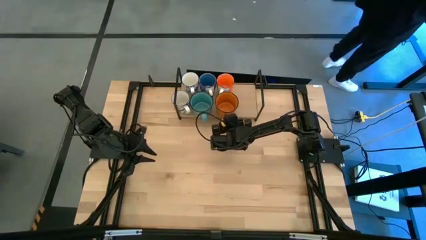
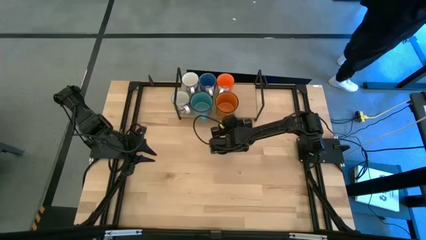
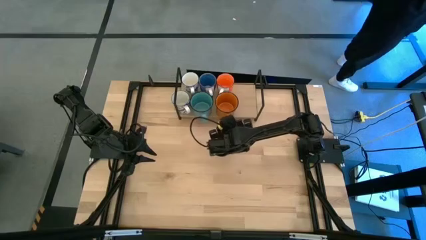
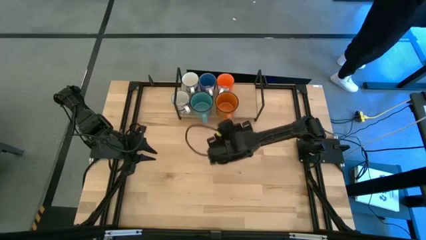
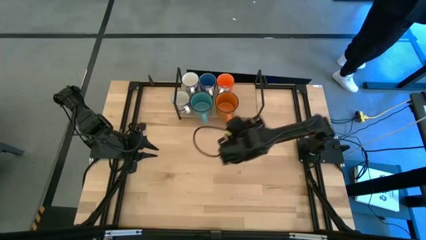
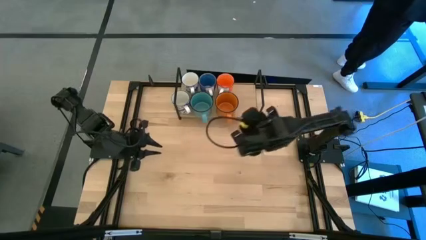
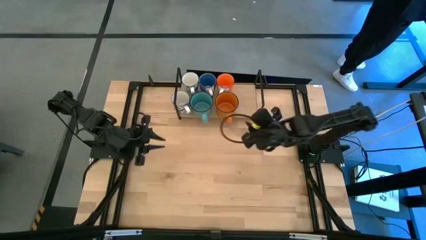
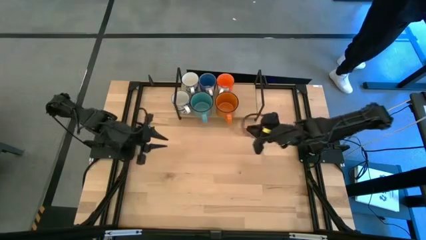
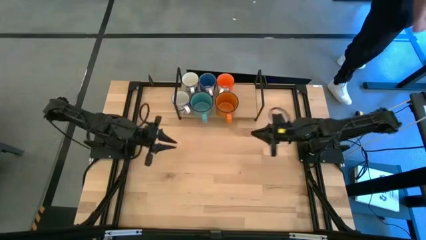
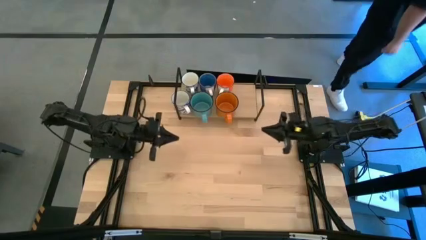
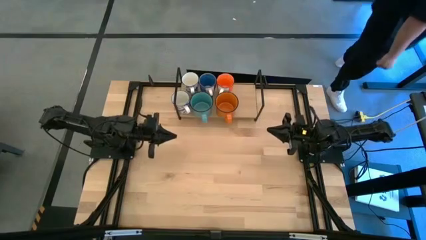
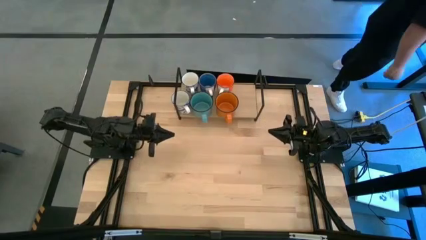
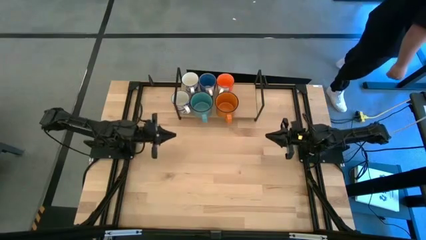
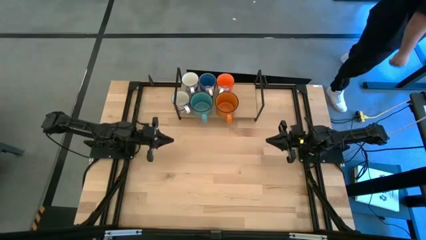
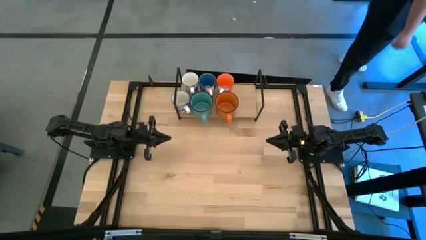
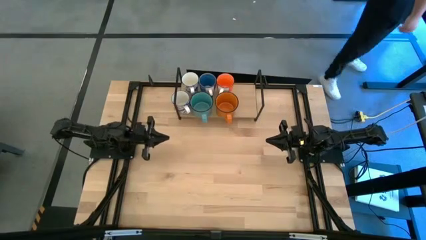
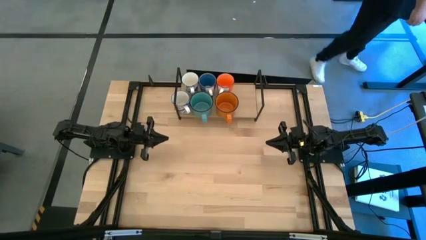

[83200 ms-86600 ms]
Task: Place coffee mugs
Return to Home Position

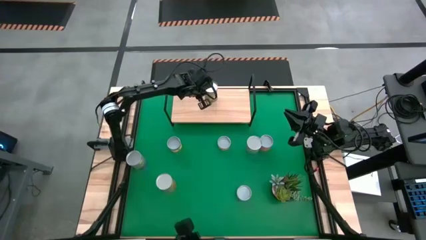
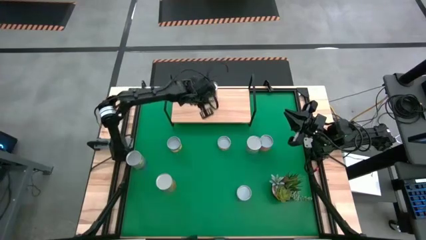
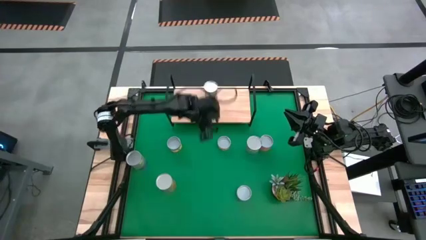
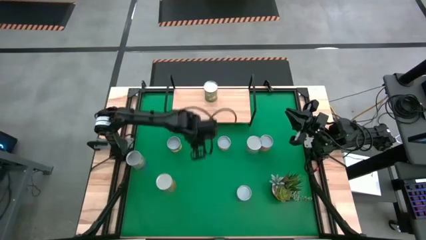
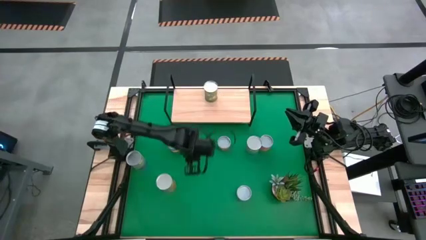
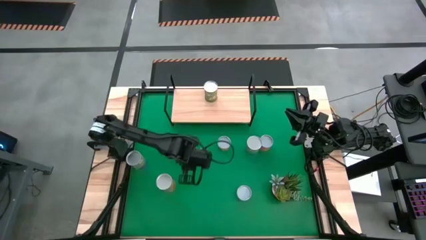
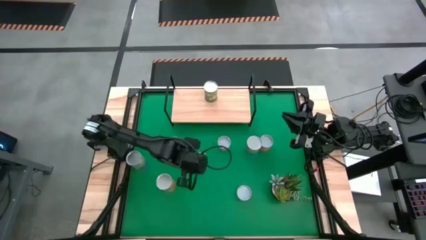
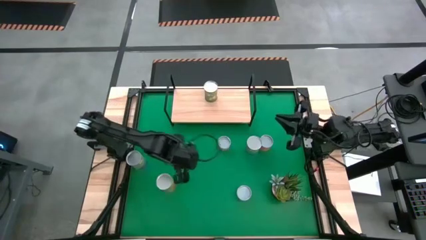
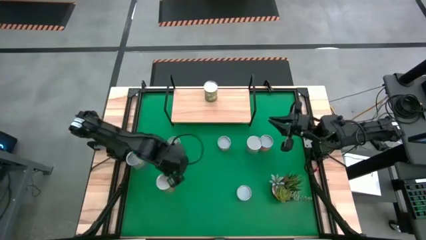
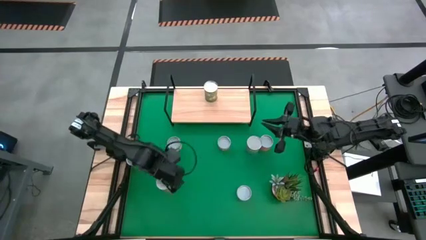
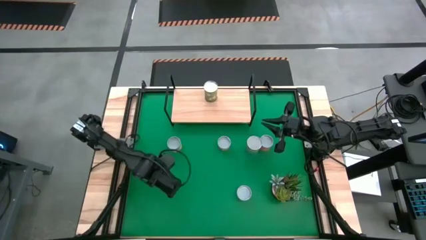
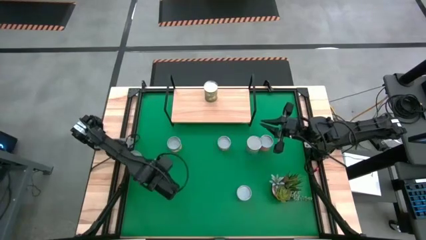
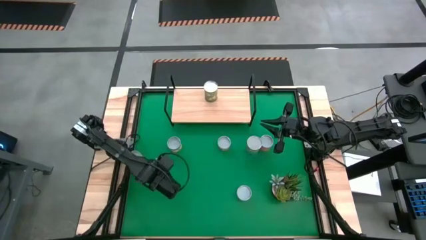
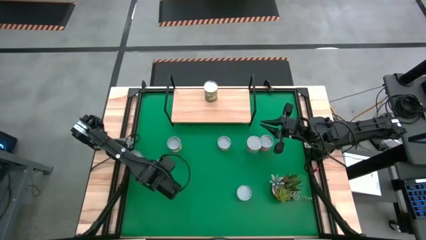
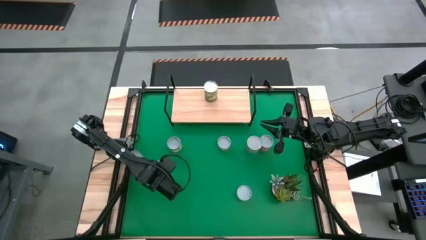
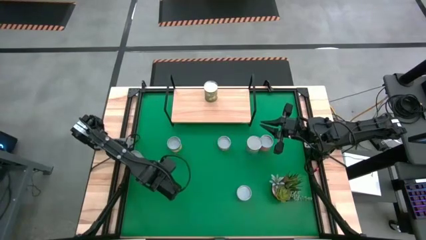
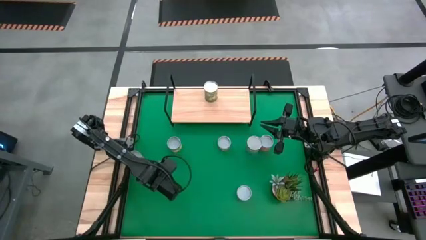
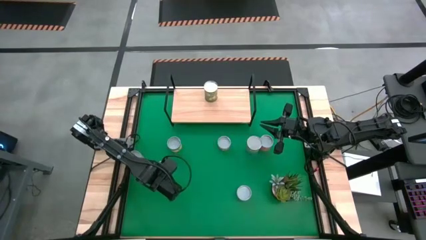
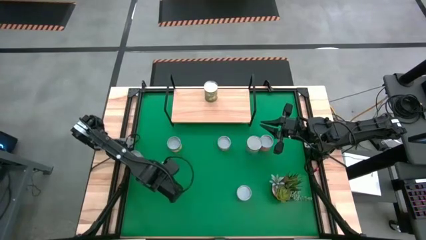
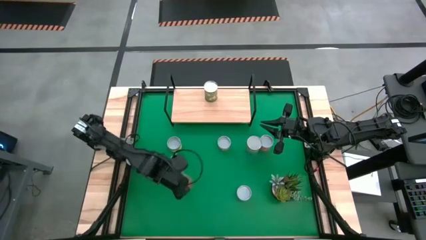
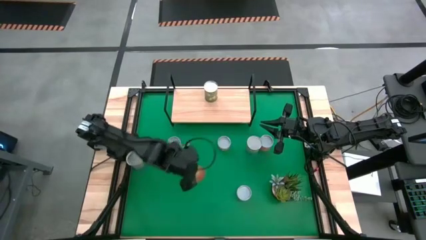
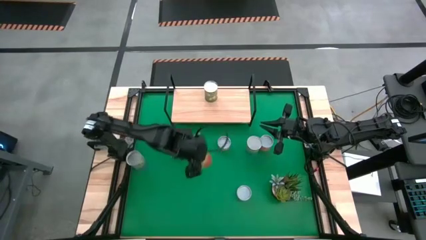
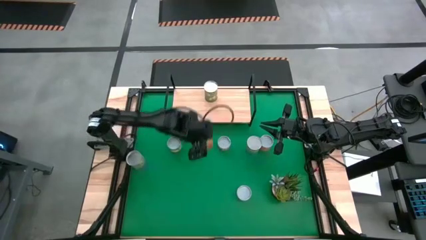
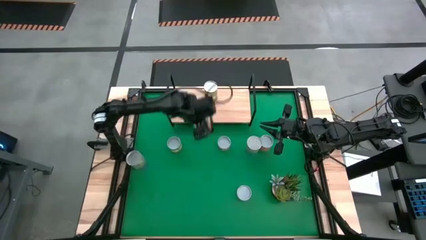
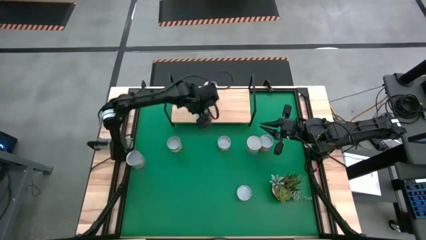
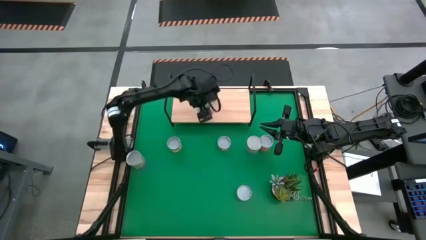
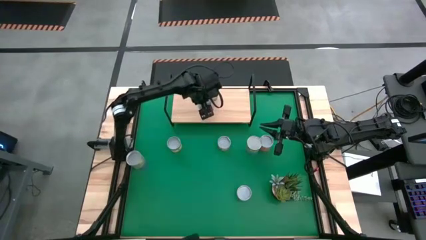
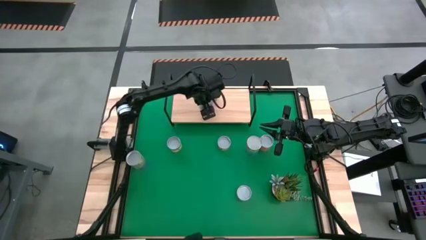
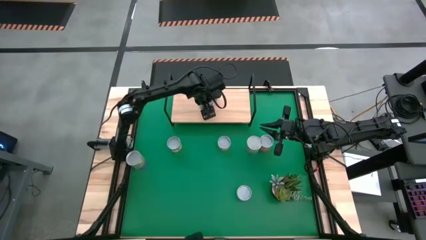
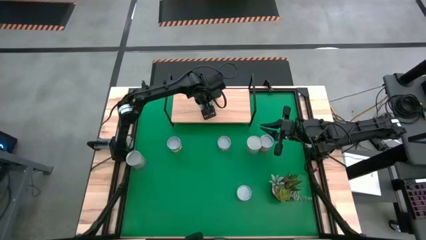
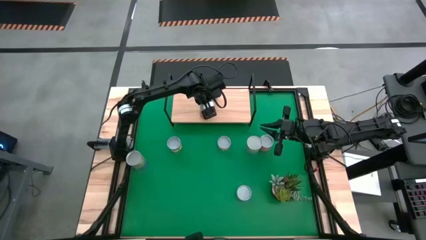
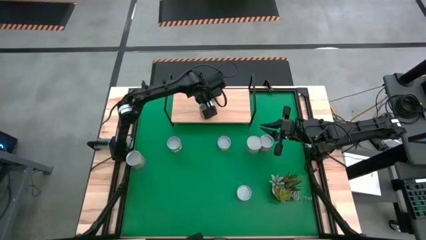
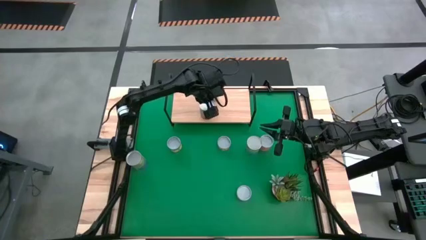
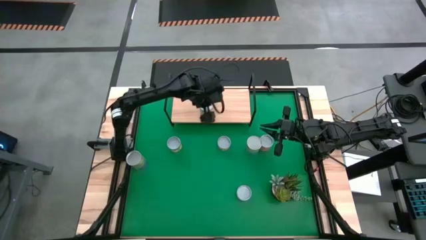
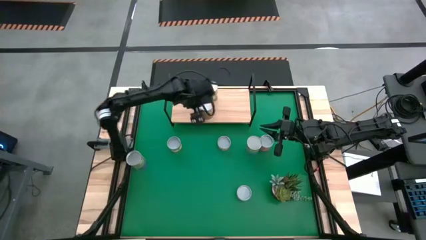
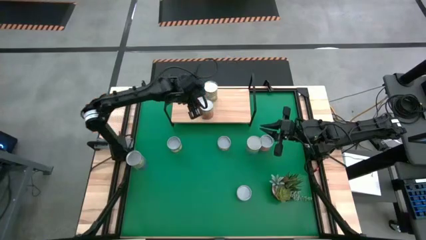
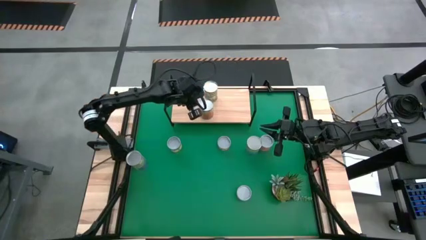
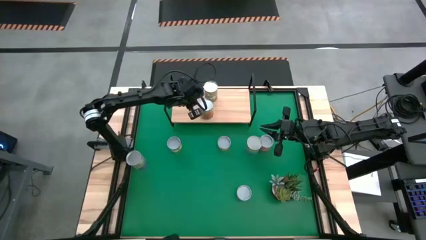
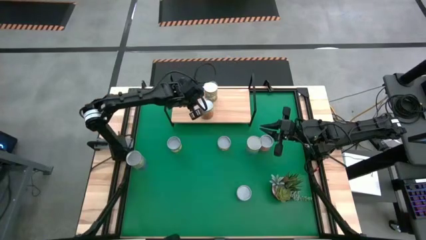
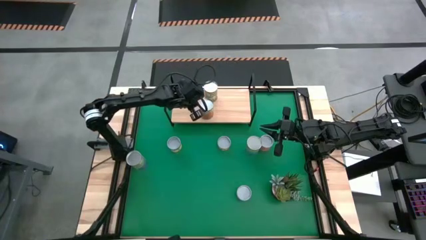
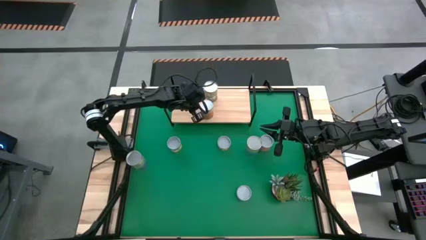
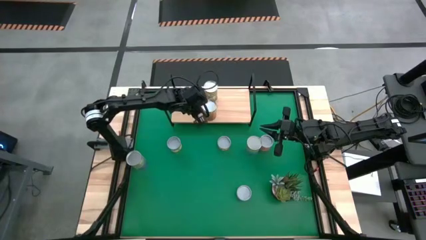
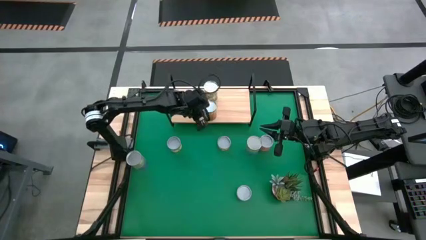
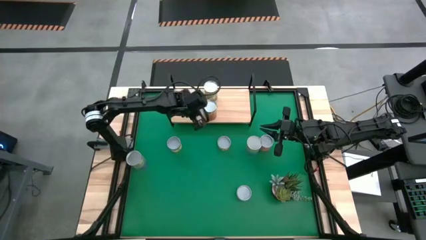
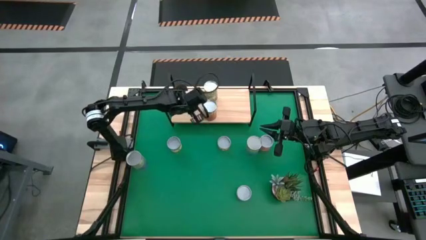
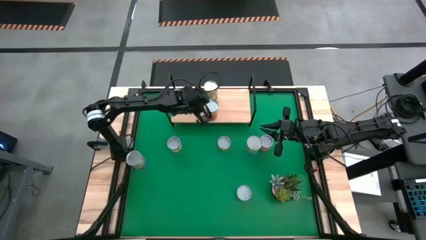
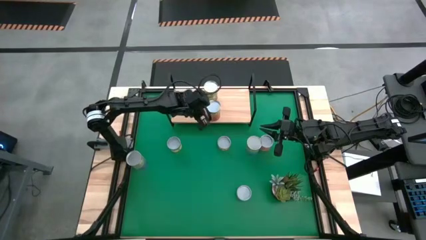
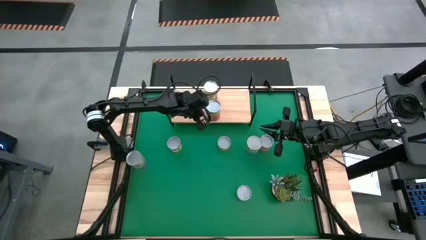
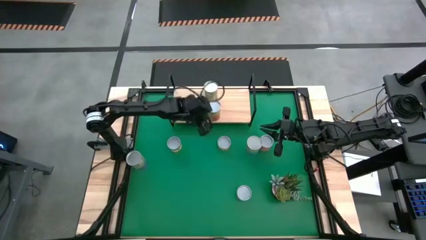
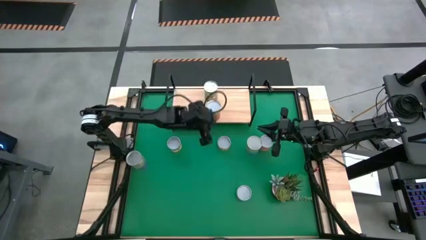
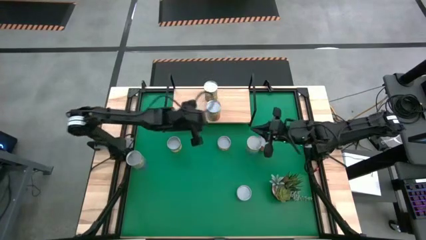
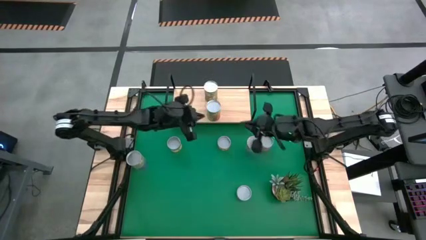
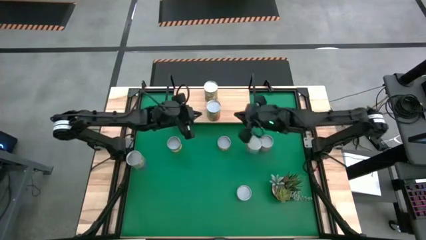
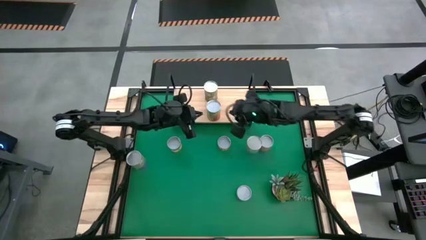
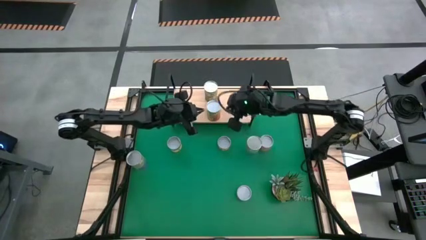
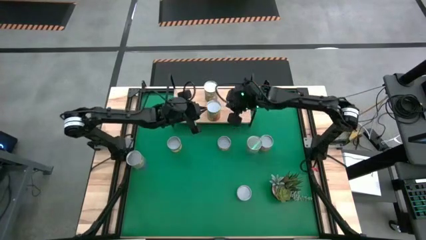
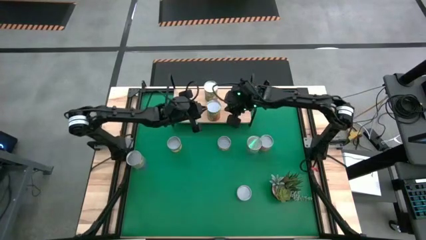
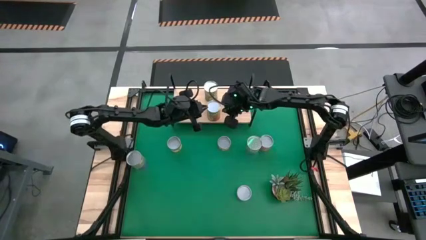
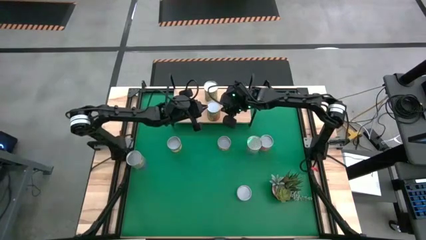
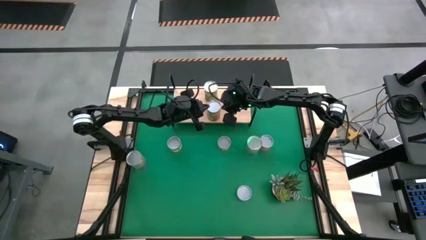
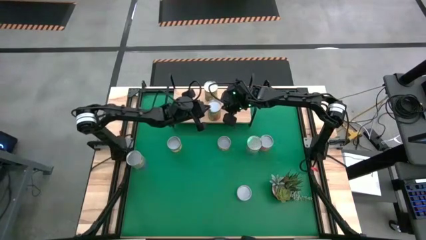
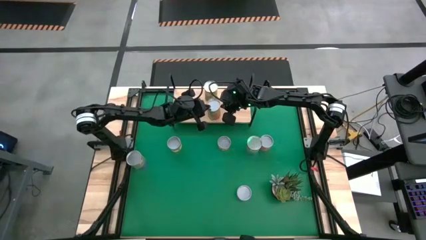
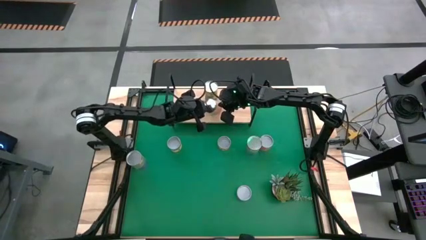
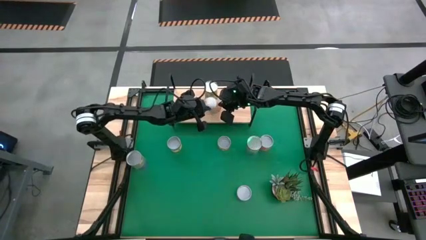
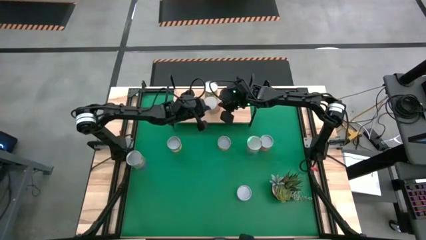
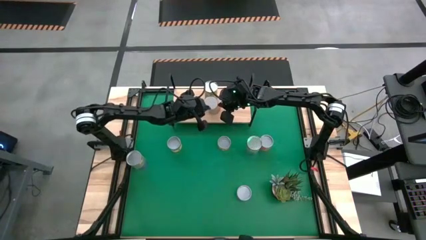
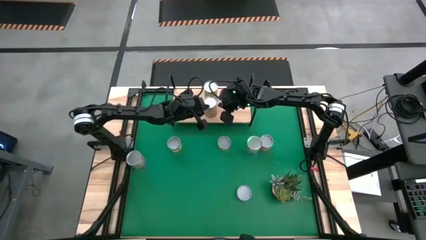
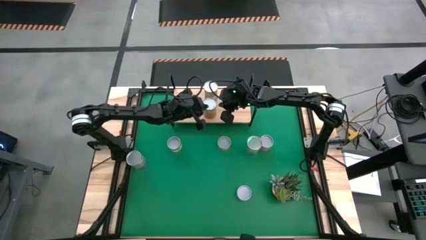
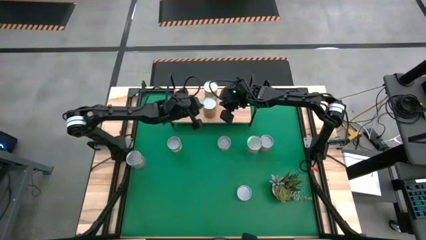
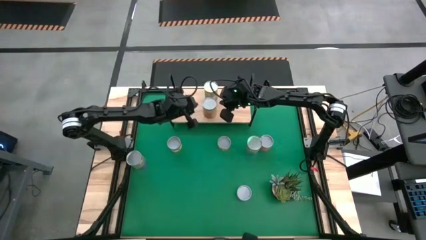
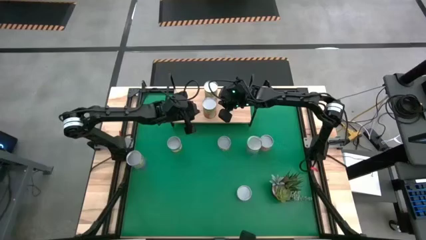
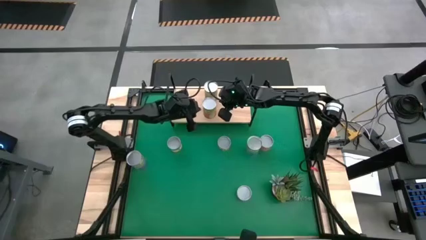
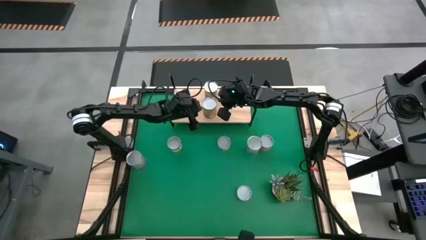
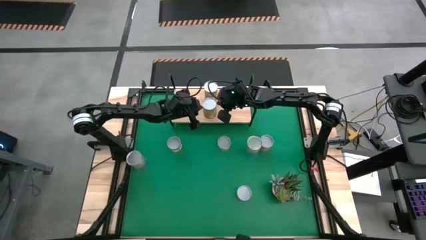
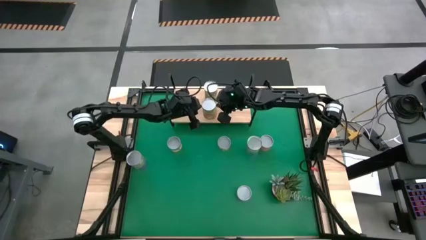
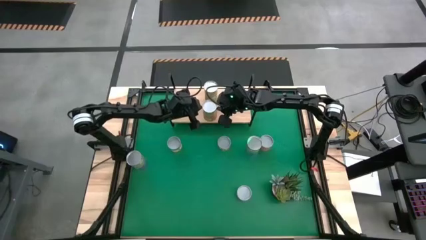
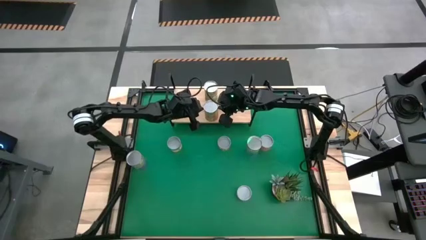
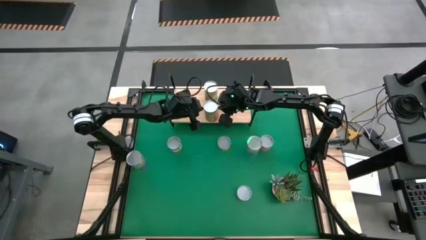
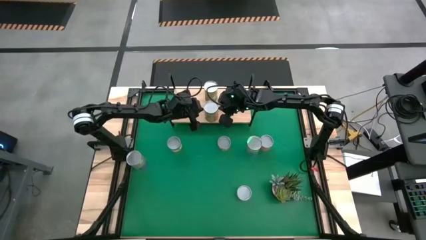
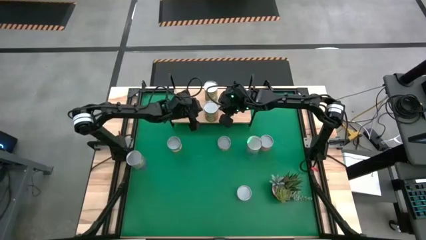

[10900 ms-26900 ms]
Task: Pick and place cans onto a shelf
Put the canned pineapple on the shelf
